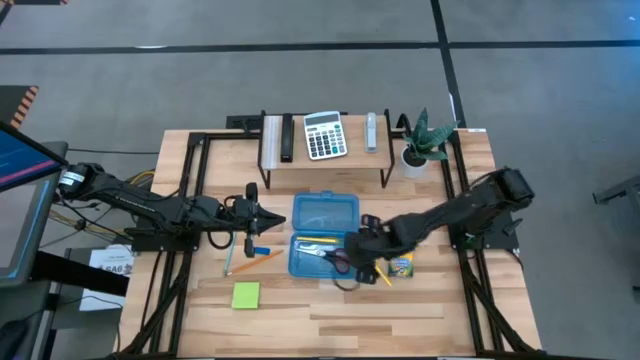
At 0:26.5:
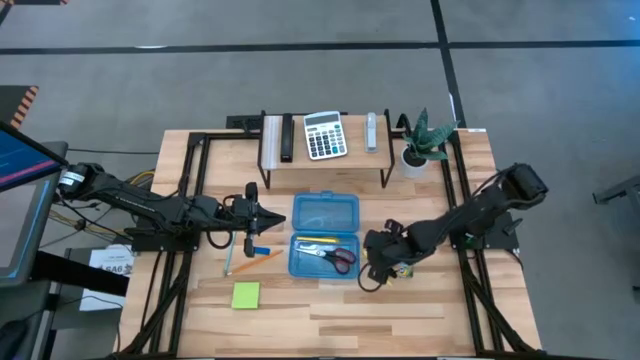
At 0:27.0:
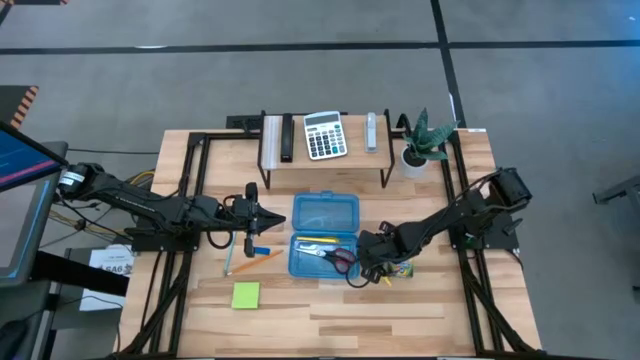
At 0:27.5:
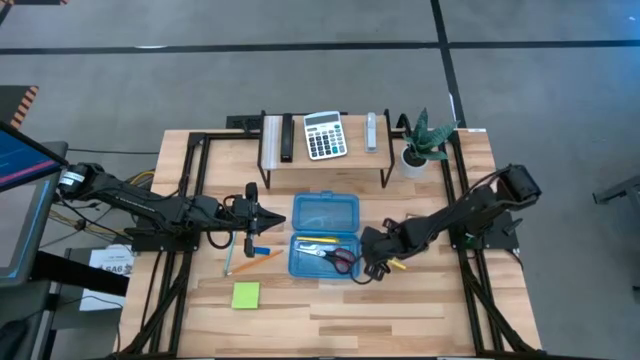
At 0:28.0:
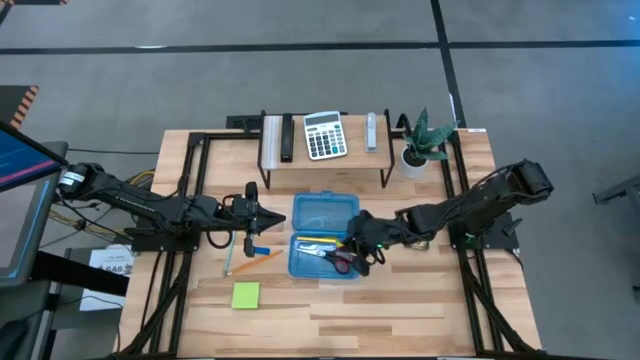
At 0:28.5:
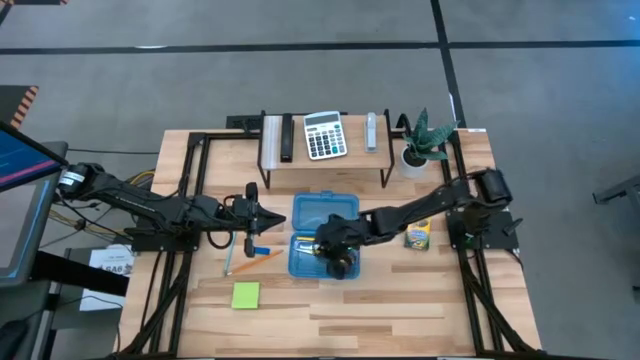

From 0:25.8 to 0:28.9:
Task: Pack school essentials
Put the yellow pen into the blue supply box

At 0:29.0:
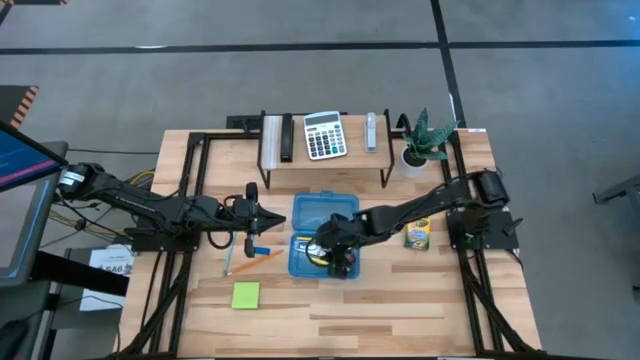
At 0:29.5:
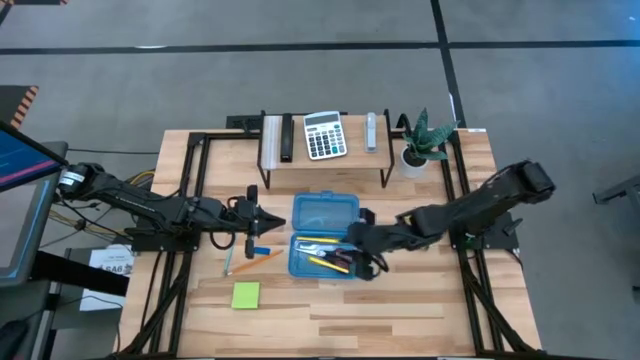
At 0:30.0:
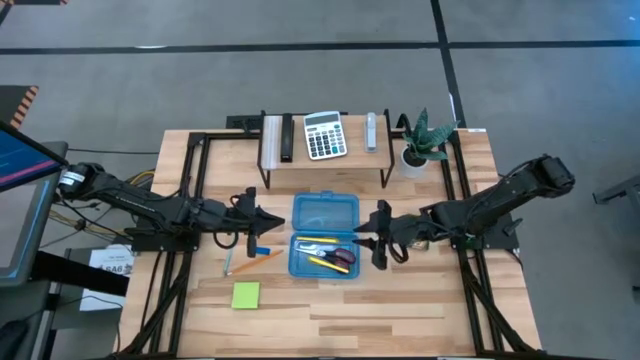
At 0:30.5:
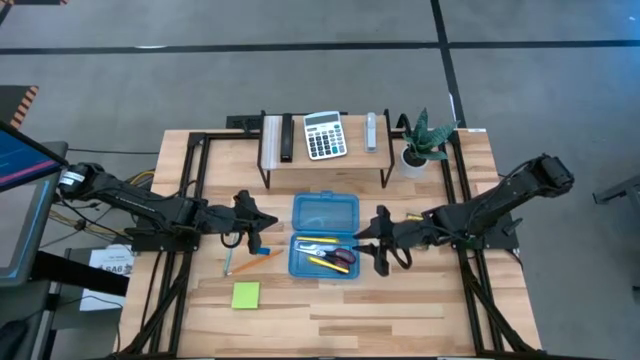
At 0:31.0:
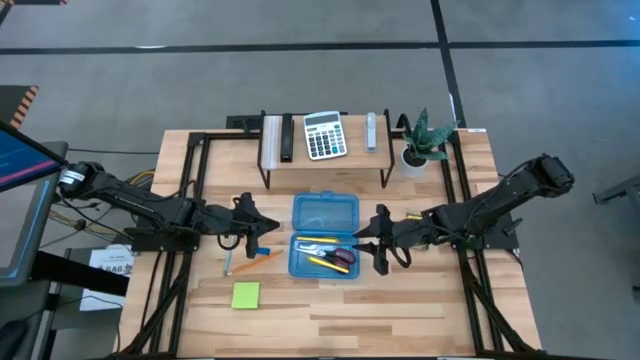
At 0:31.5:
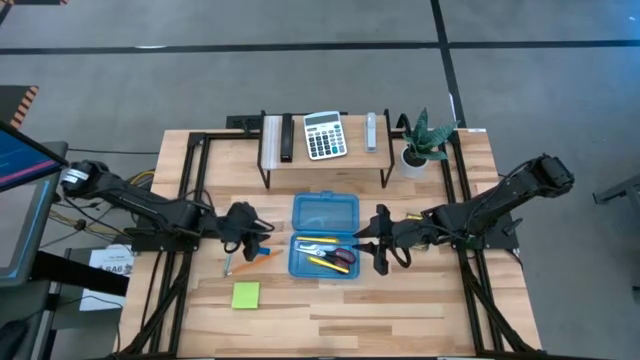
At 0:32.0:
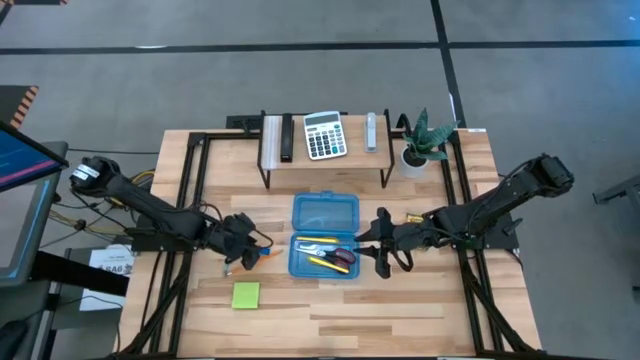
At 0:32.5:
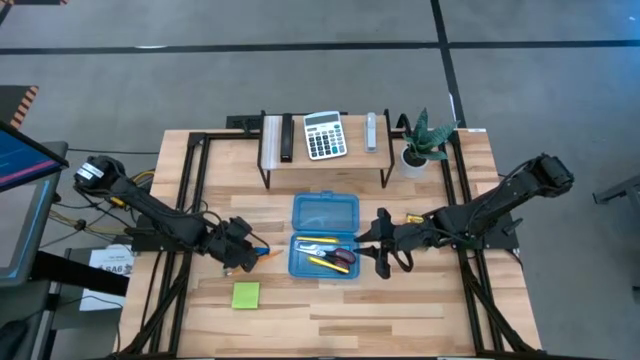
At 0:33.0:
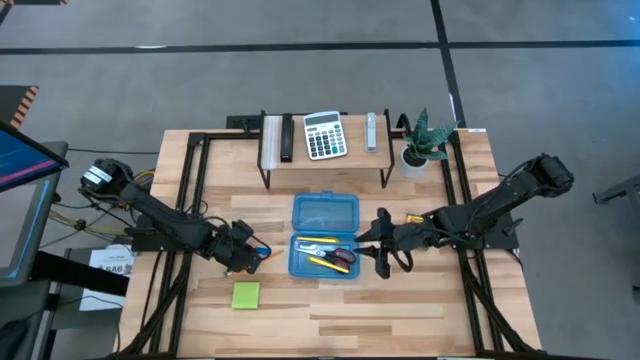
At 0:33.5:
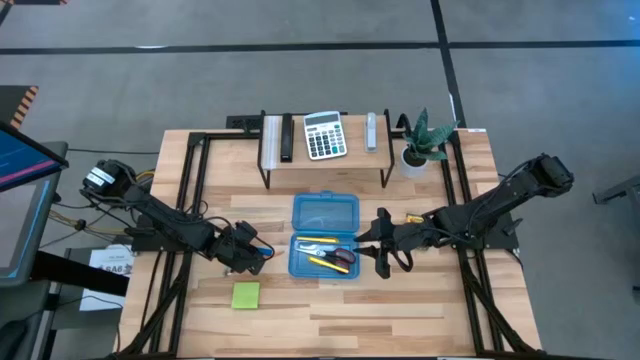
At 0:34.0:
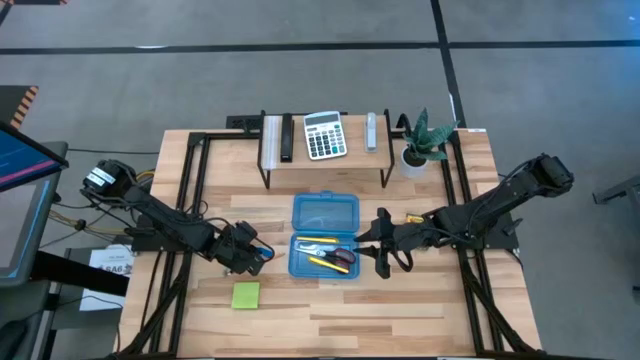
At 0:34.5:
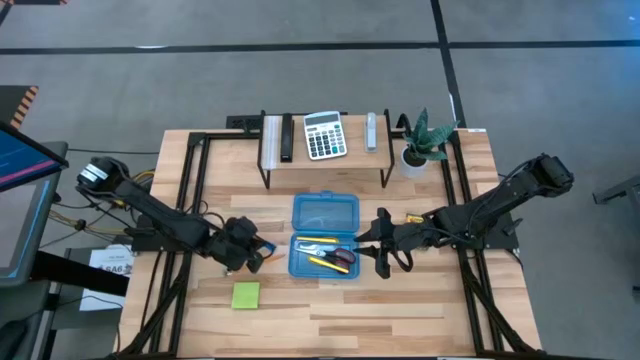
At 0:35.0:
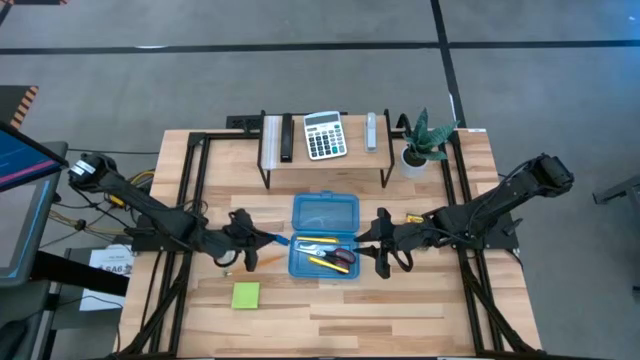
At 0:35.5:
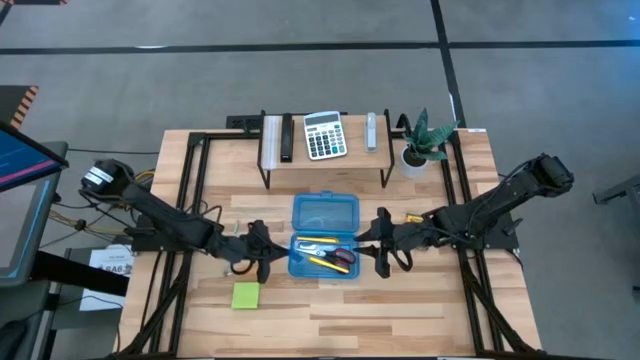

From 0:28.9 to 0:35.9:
Put the blue eraser into the blue supply box

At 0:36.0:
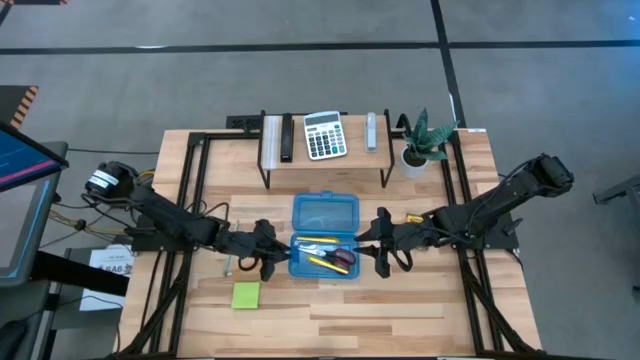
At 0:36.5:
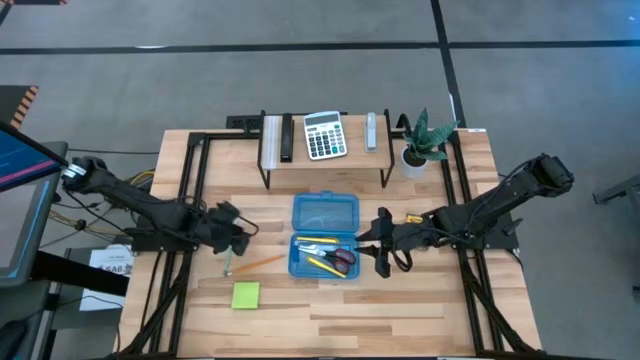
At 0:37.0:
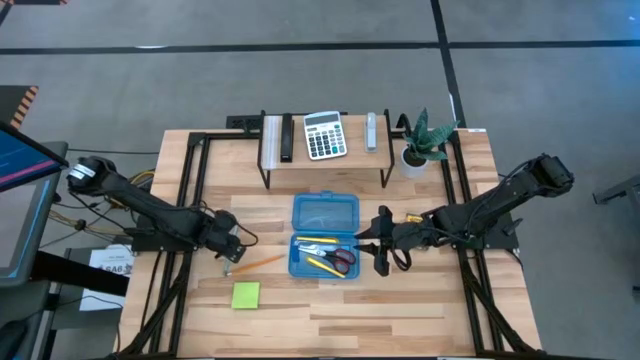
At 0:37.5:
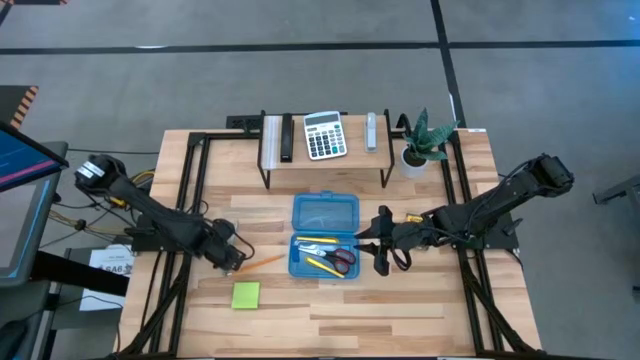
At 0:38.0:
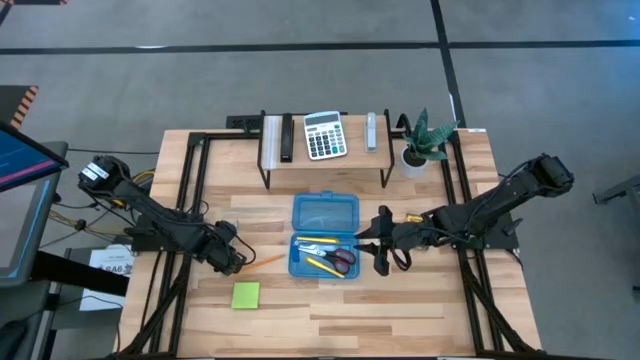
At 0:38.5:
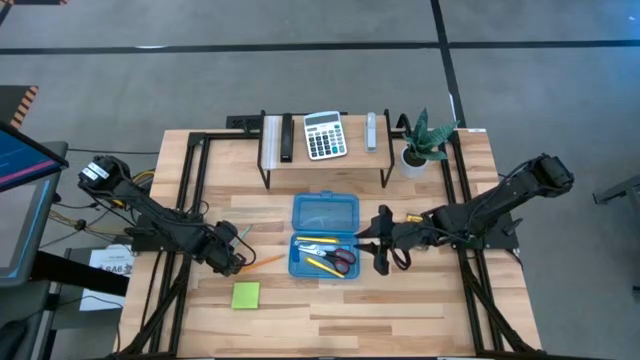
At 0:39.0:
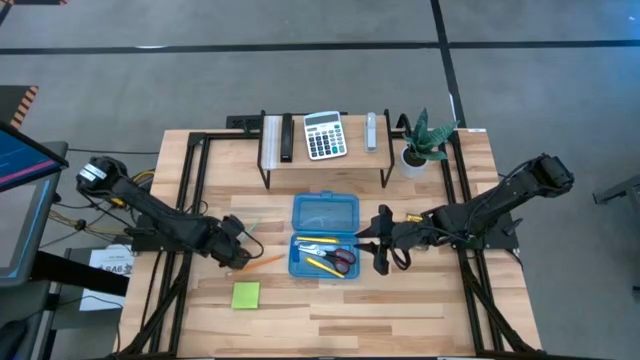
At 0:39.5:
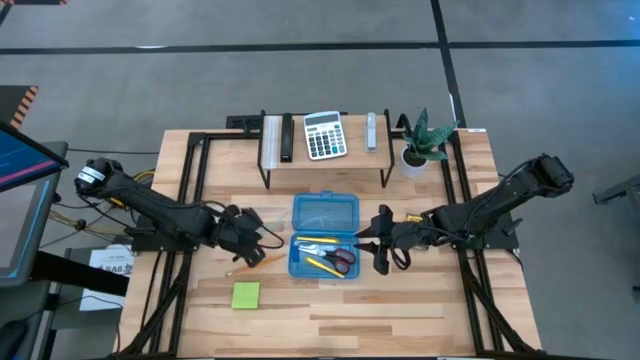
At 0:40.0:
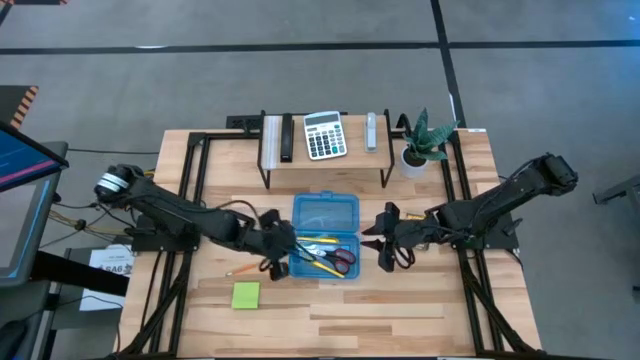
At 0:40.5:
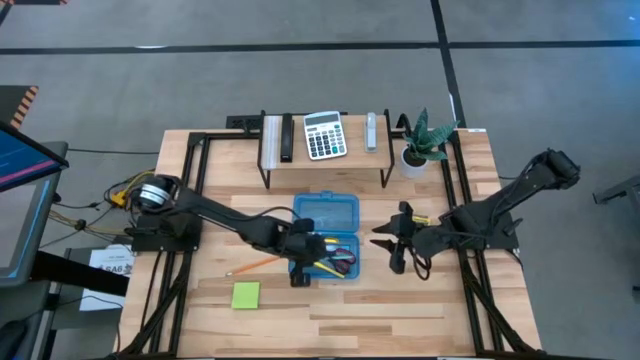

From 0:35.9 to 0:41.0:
Put the light blue pencil into the blue supply box

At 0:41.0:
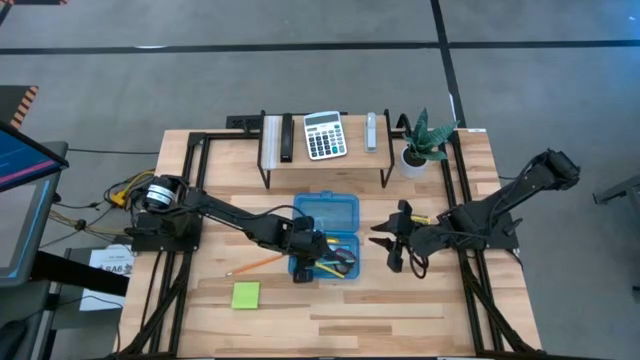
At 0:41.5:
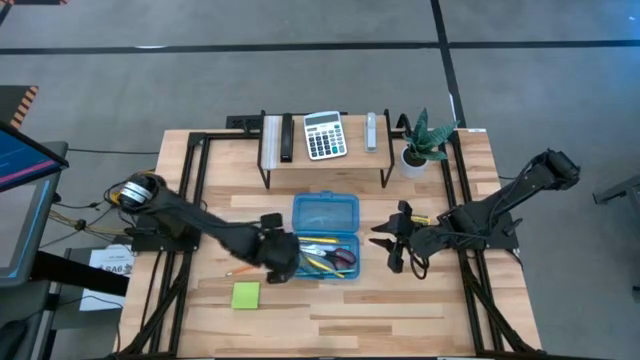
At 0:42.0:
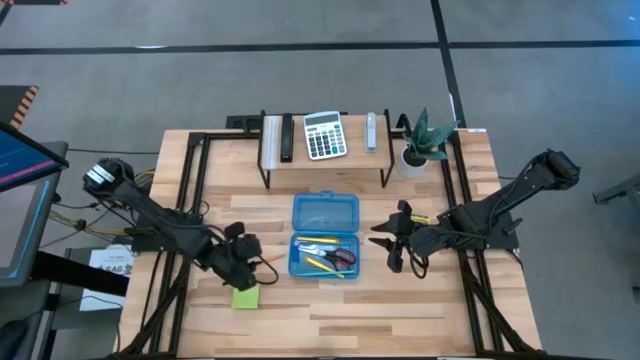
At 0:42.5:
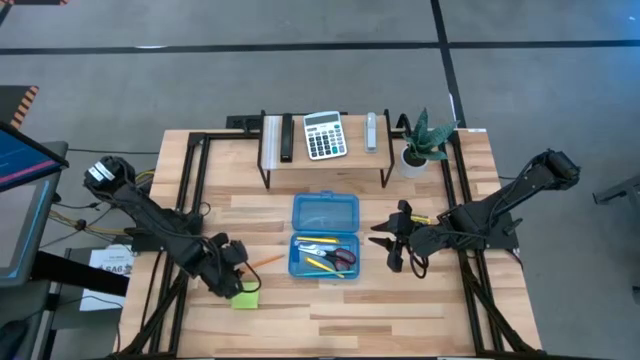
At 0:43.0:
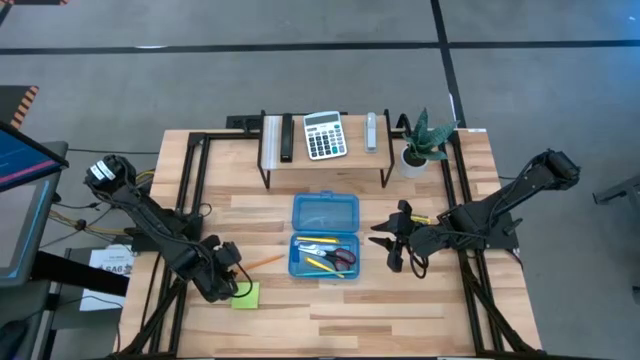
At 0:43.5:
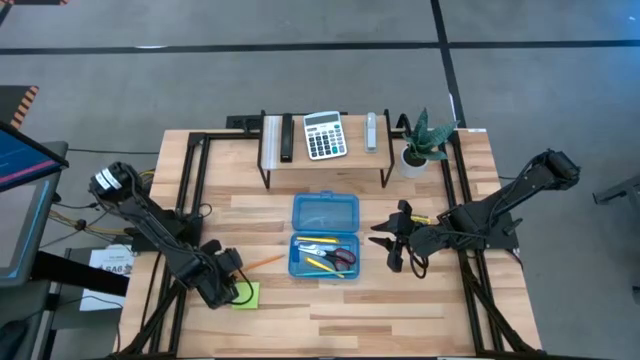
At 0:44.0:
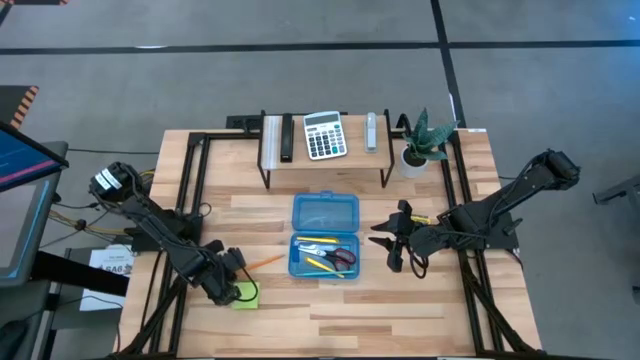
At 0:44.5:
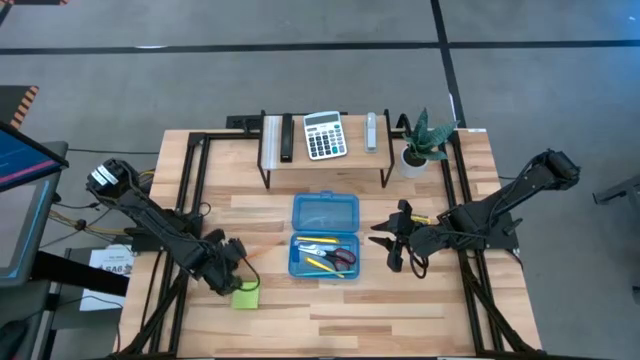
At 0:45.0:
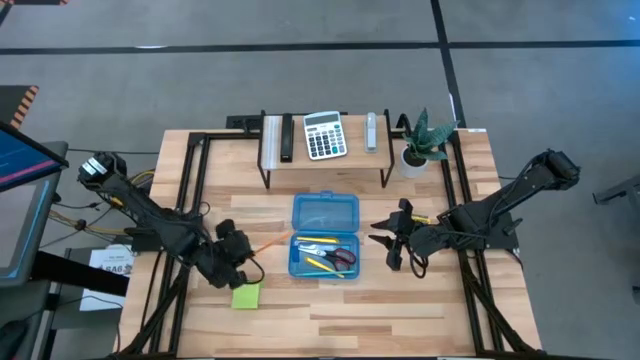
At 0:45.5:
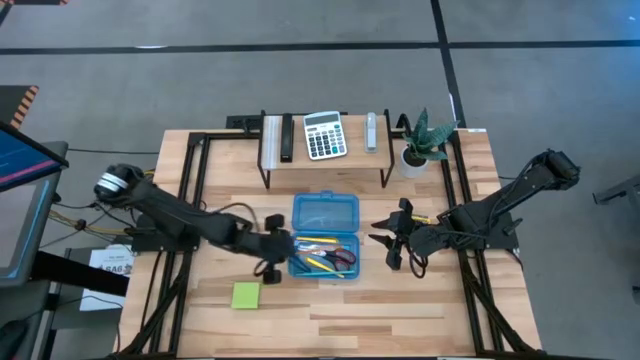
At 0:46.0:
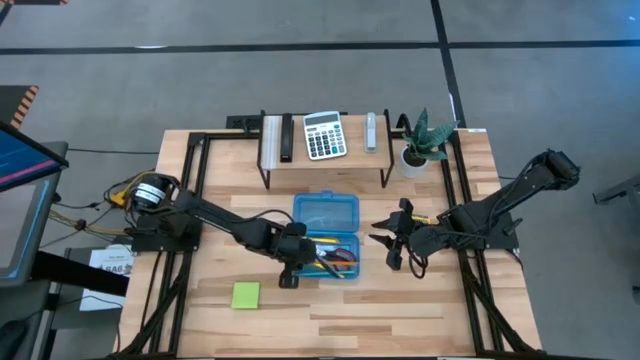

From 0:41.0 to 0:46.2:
Put the orange pencil into the blue supply box

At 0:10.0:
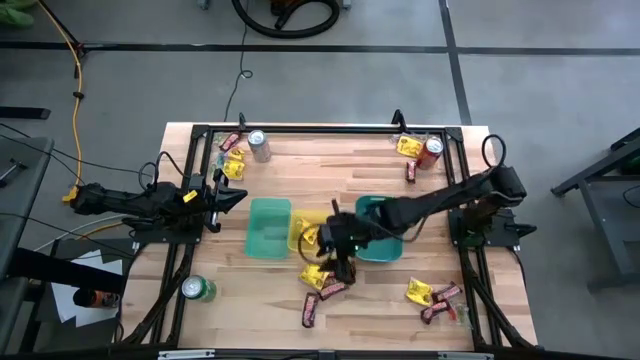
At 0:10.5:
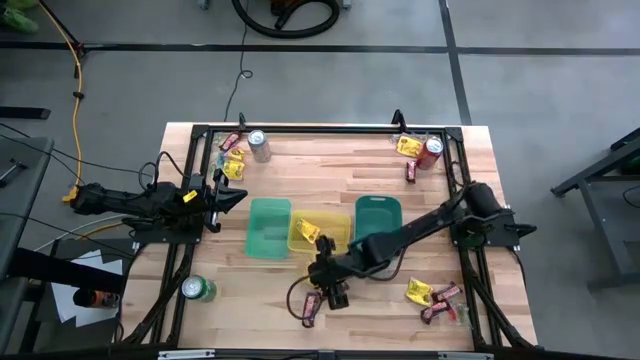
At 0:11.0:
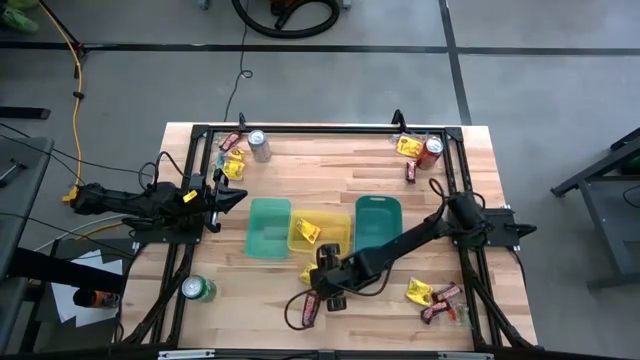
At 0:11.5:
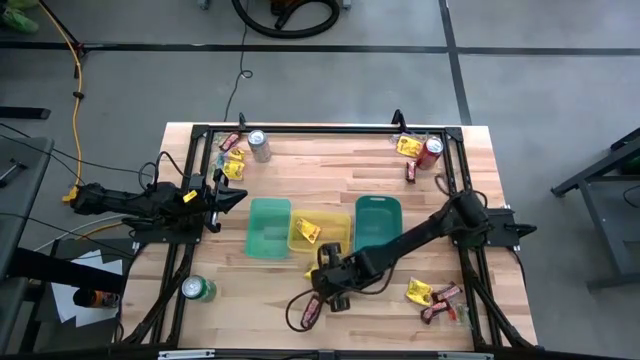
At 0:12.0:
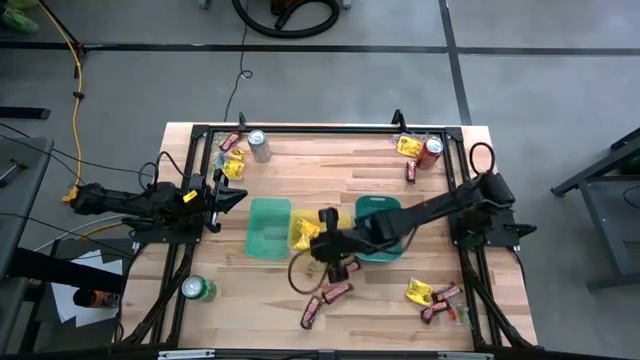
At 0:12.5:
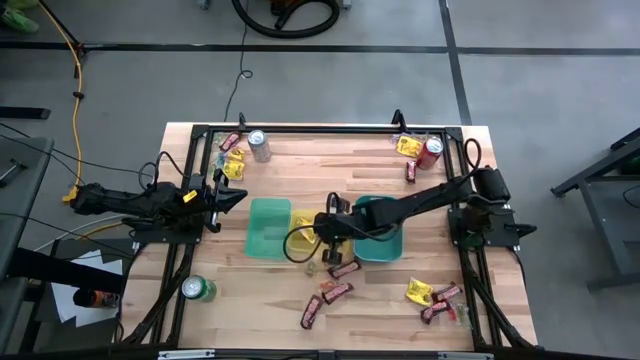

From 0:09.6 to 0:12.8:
Task: Sort candy
Put the yellow candy into the yellow bin
